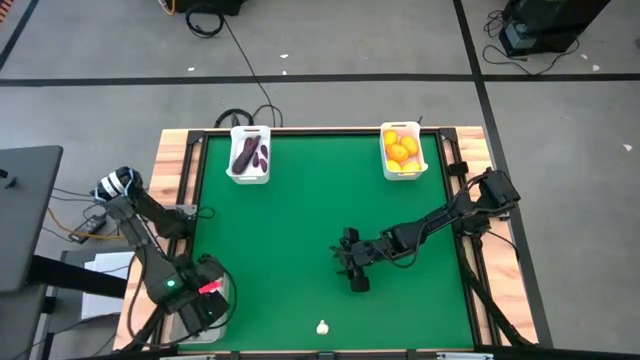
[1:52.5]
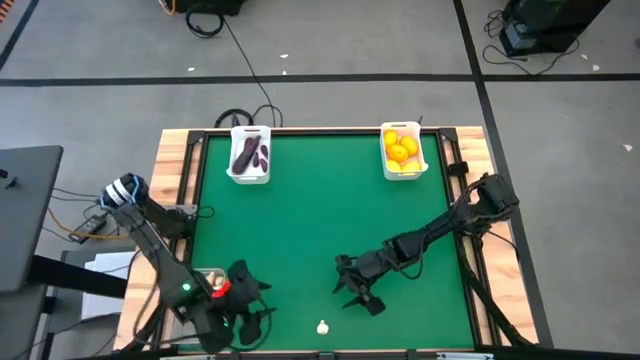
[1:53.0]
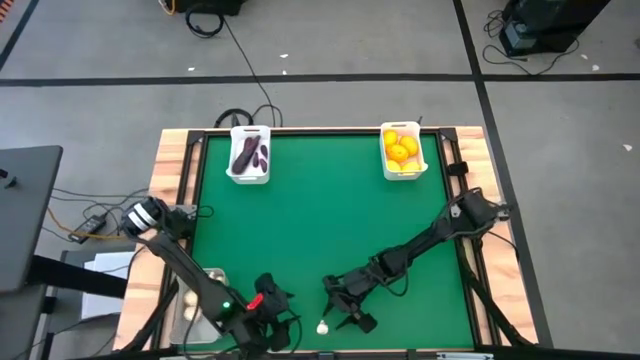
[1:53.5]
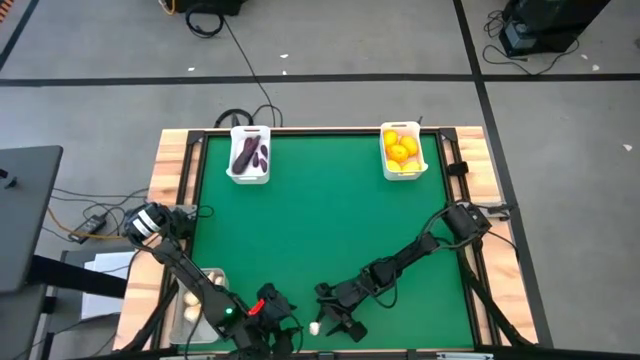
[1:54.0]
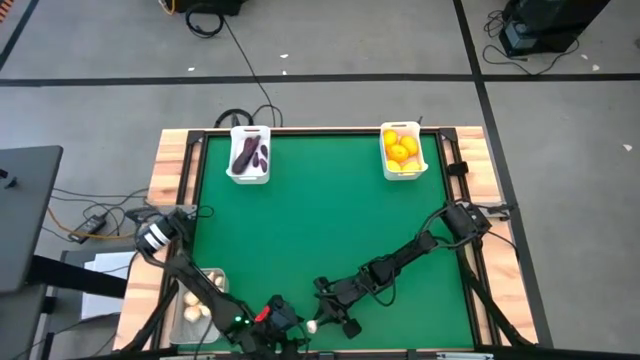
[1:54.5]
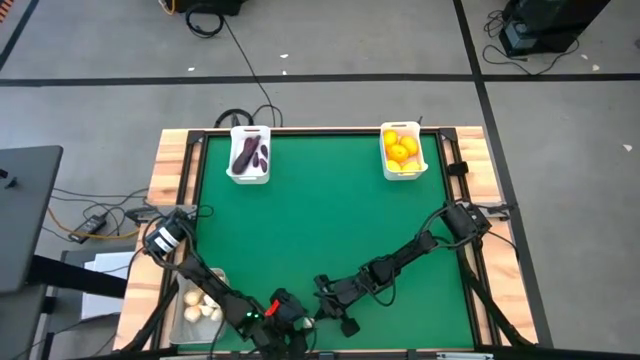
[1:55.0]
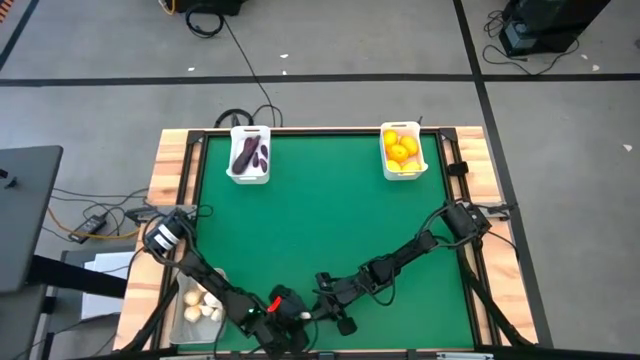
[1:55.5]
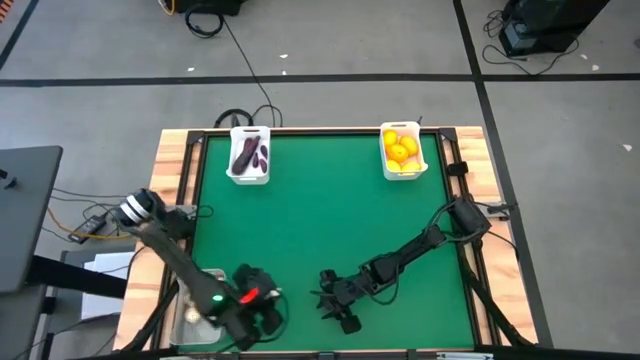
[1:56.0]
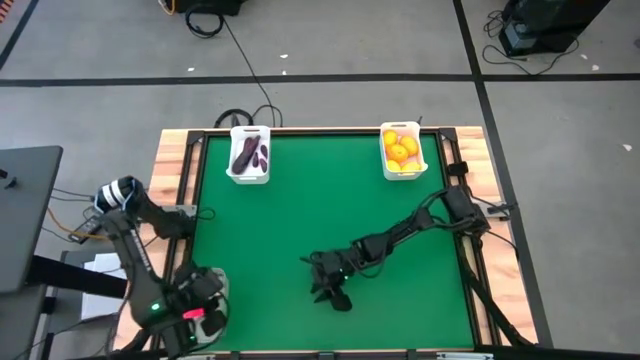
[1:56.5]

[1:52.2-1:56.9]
Task: Sort produce into baskets
Put the garlic on the gray bin

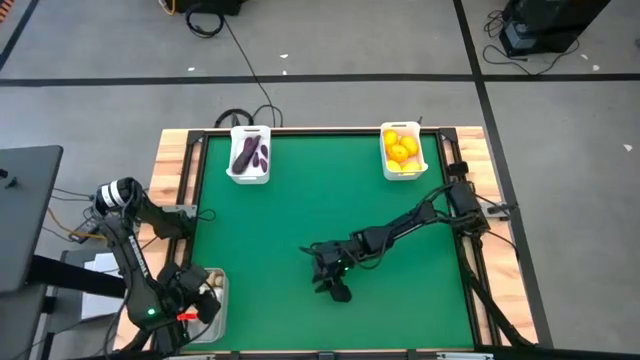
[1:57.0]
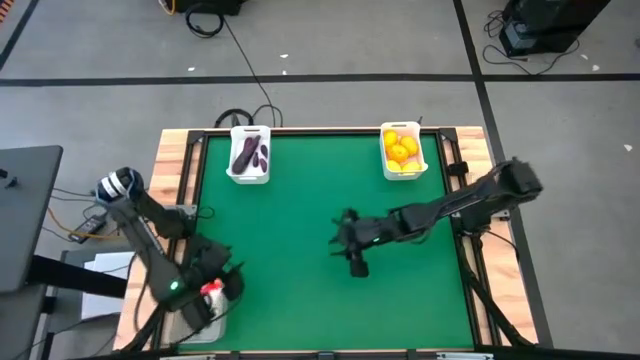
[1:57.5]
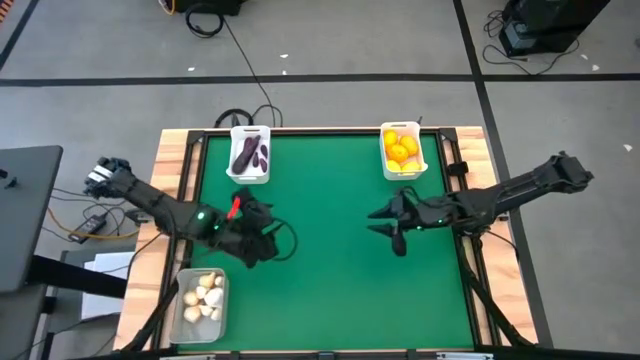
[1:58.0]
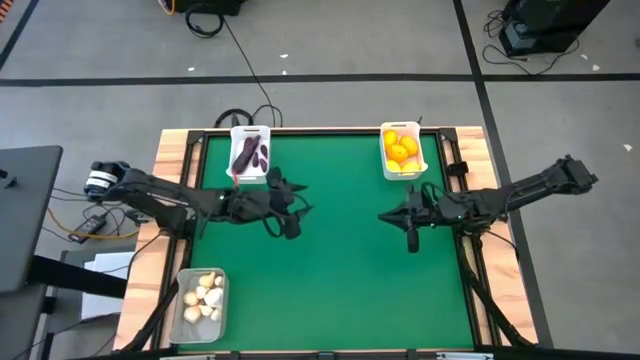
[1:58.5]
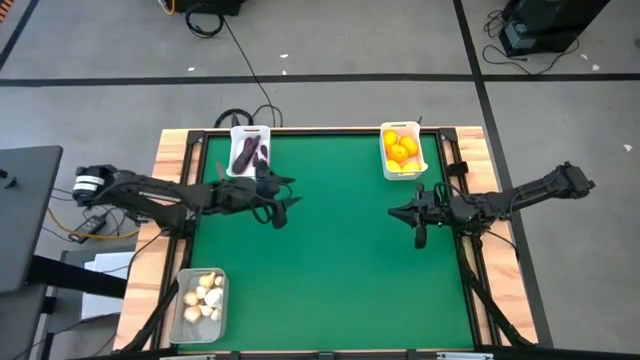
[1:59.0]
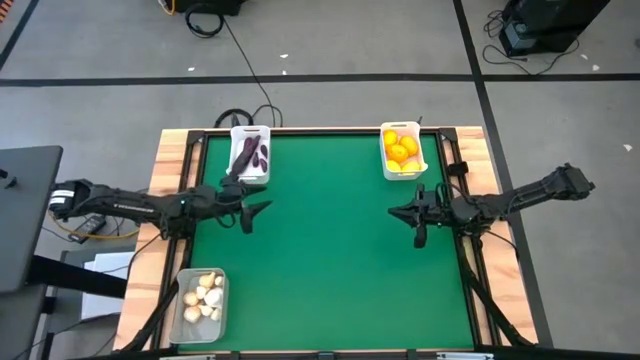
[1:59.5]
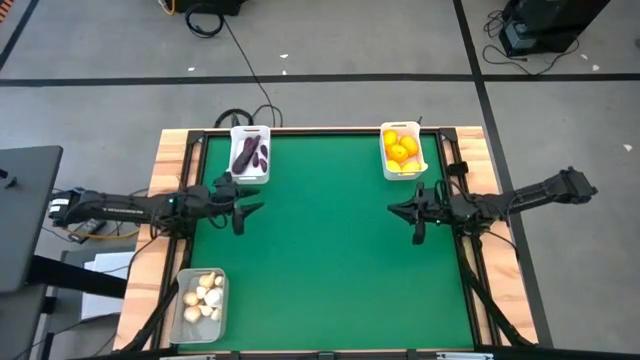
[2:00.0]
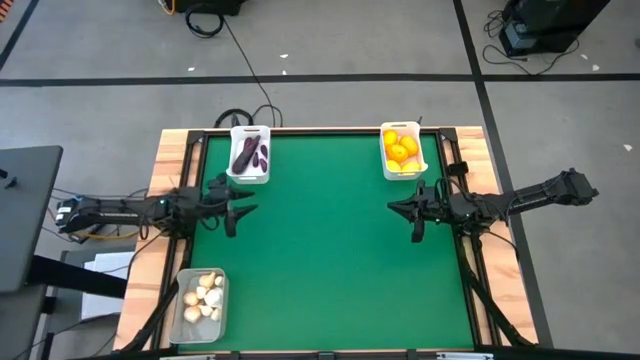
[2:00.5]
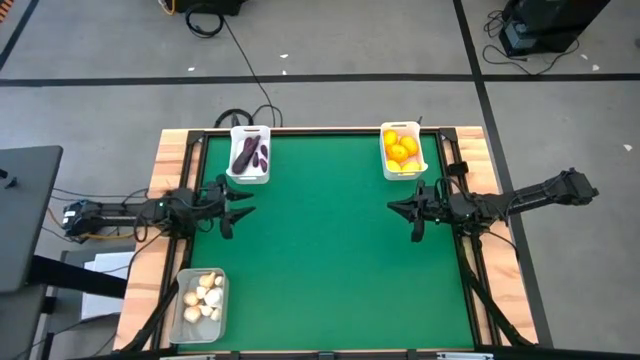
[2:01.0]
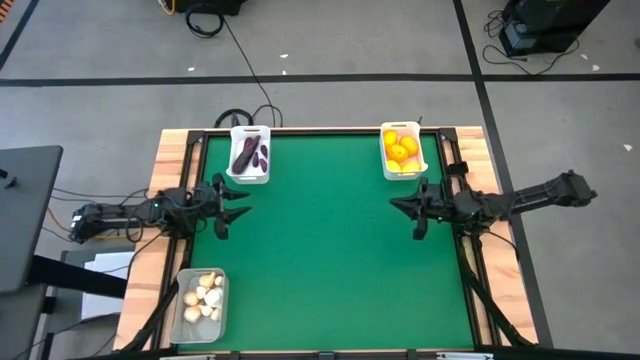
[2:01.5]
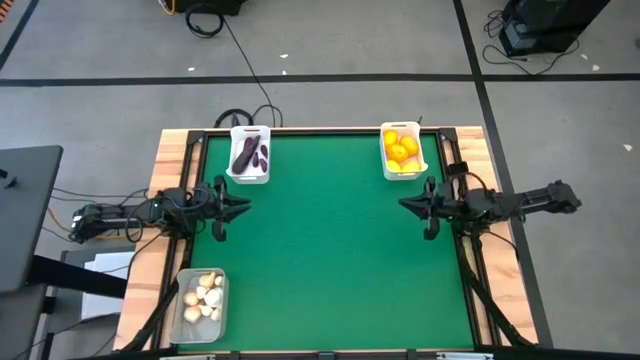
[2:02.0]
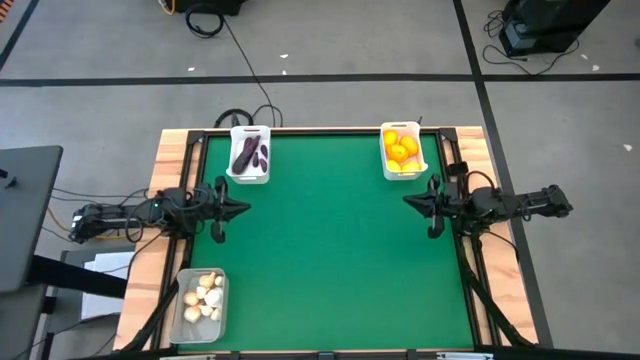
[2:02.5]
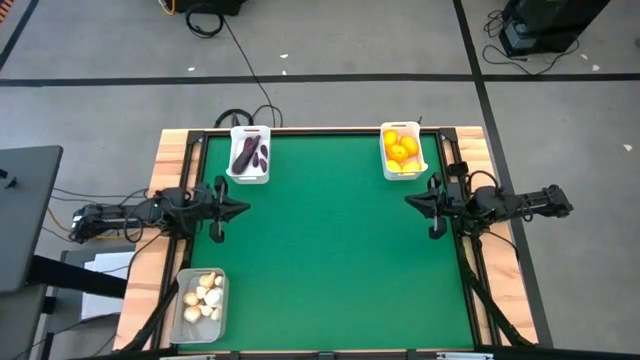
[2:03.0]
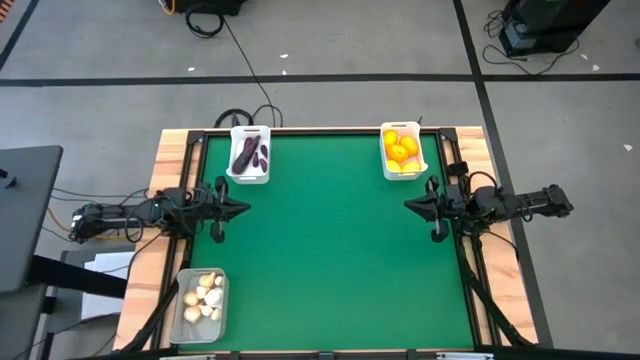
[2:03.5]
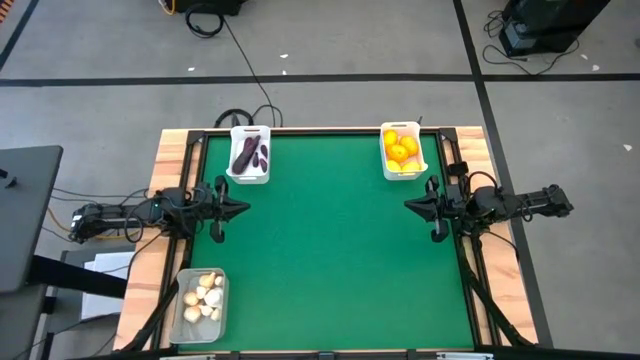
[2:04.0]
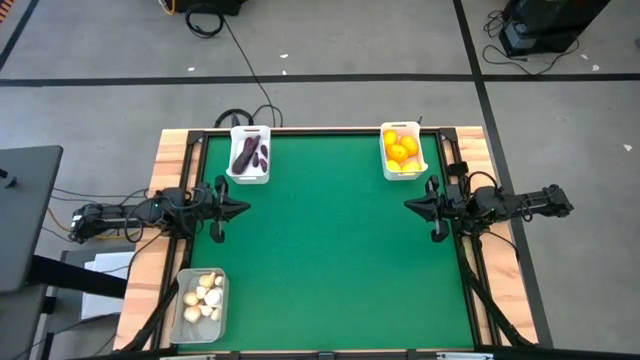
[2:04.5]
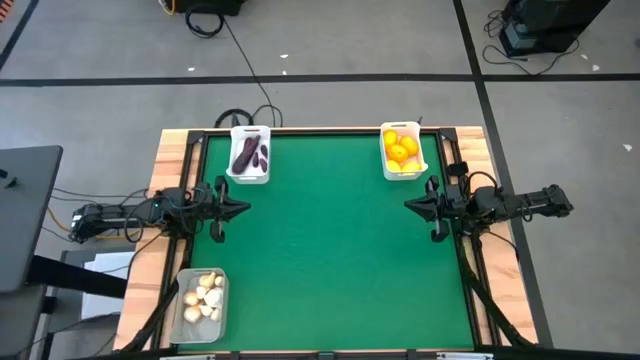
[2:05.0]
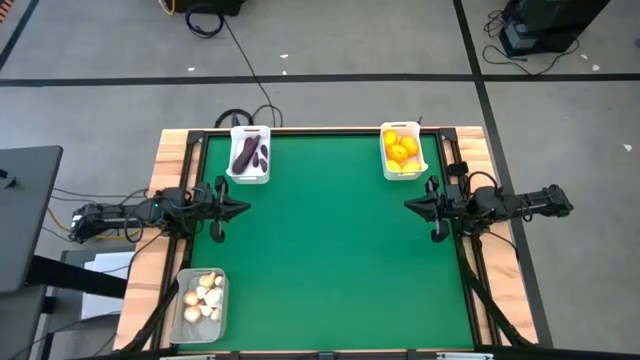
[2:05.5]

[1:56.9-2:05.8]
Return to Home Position

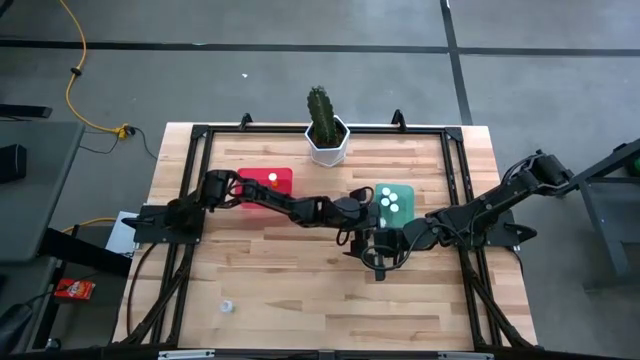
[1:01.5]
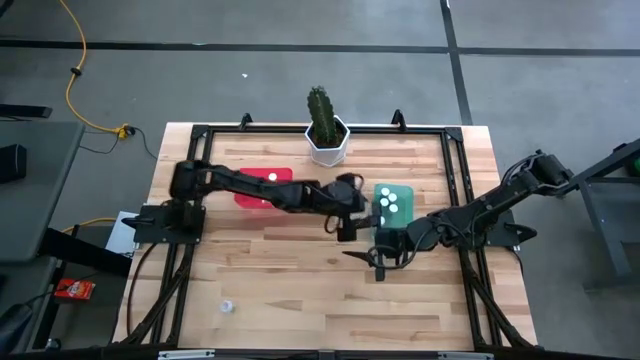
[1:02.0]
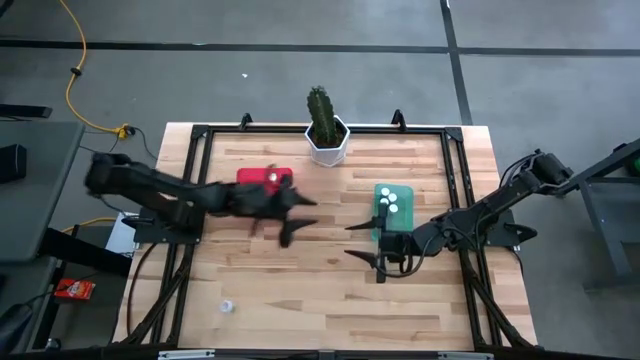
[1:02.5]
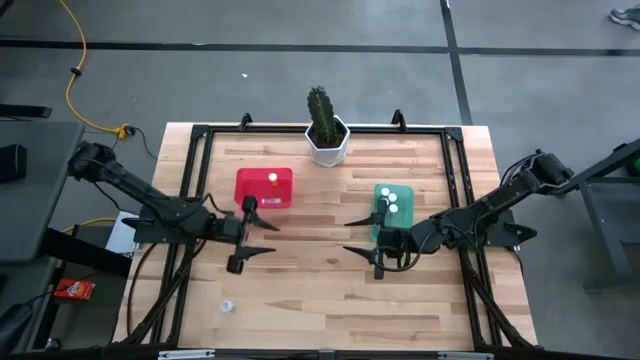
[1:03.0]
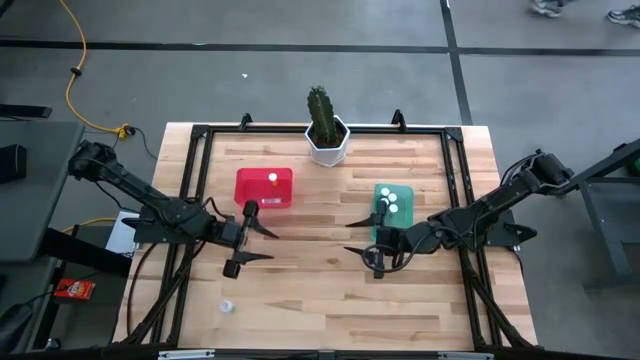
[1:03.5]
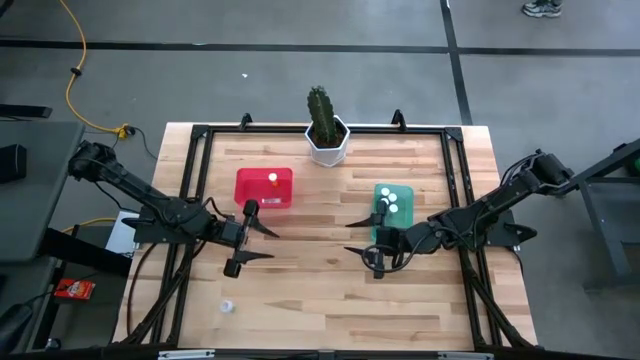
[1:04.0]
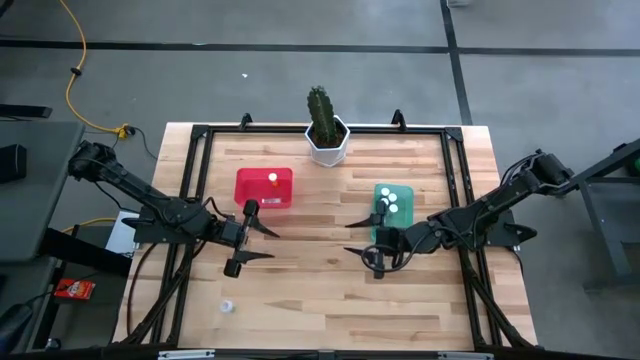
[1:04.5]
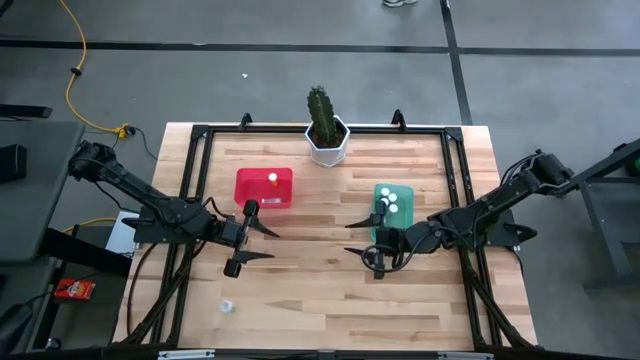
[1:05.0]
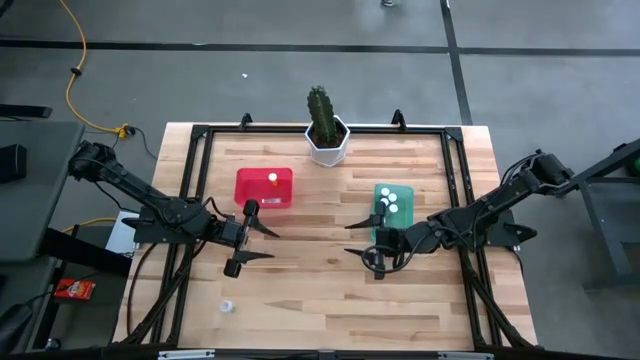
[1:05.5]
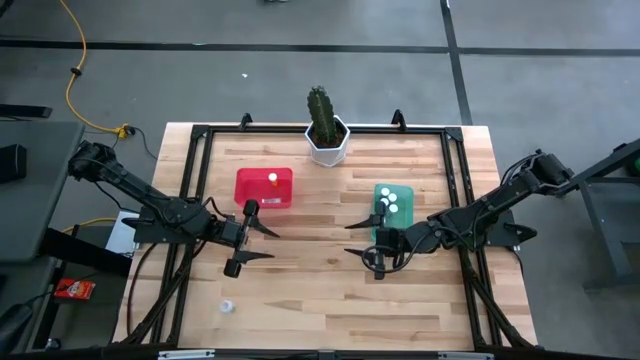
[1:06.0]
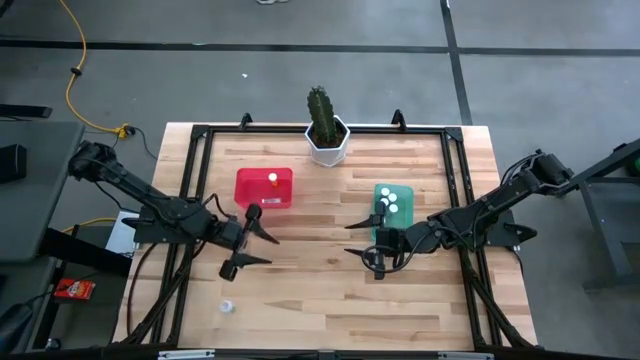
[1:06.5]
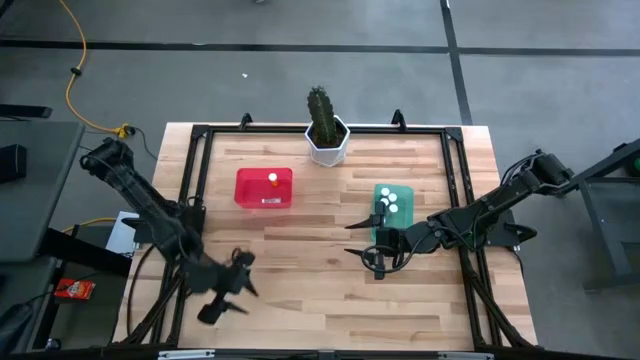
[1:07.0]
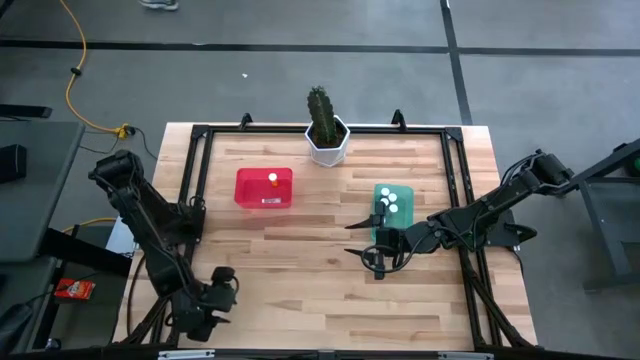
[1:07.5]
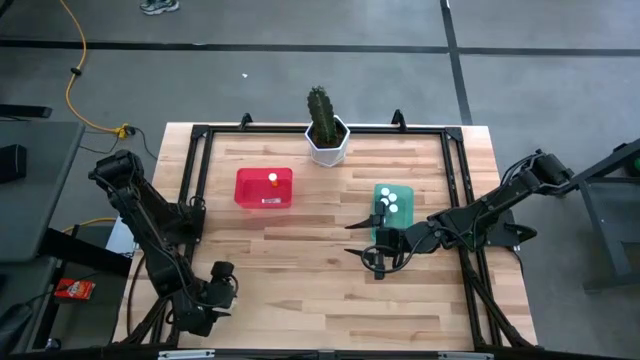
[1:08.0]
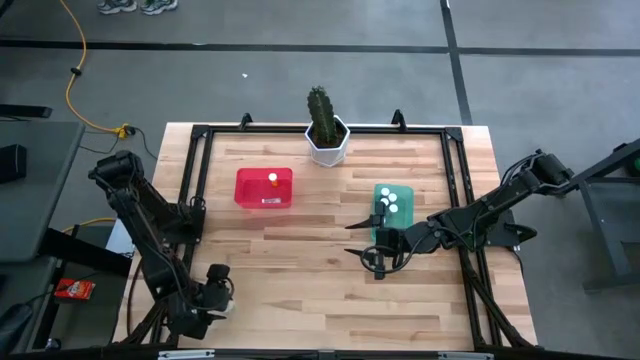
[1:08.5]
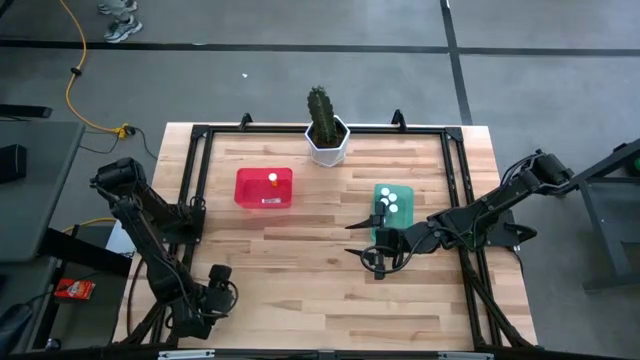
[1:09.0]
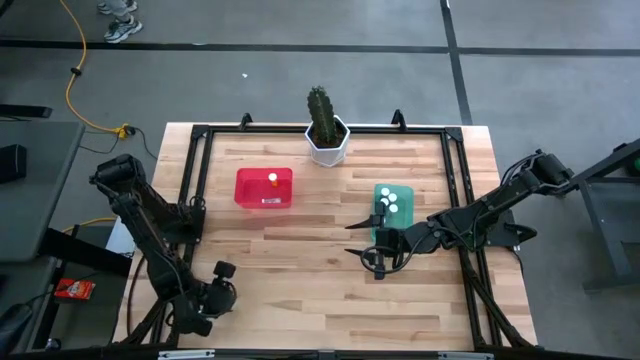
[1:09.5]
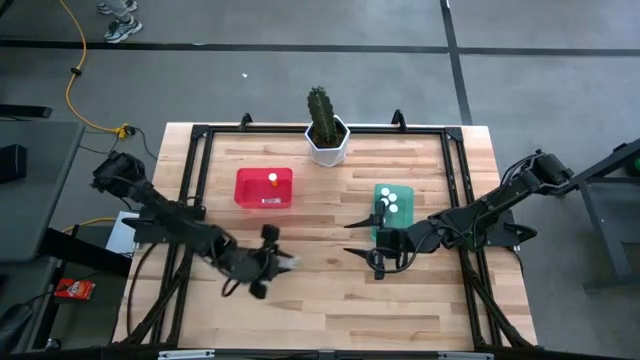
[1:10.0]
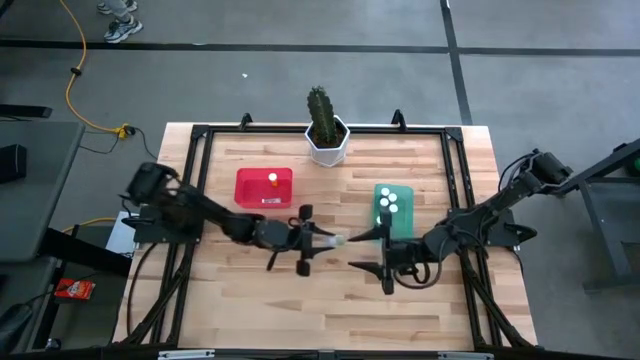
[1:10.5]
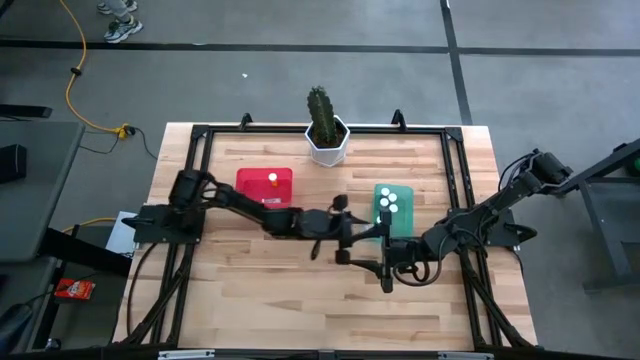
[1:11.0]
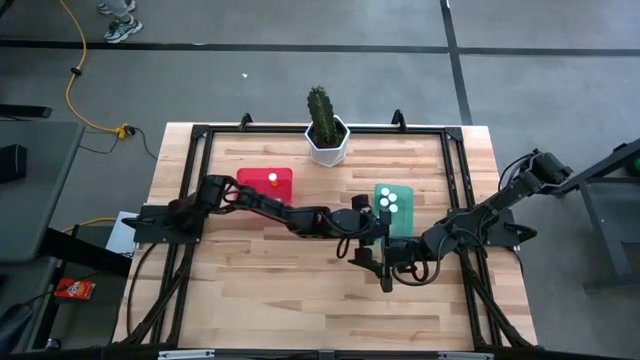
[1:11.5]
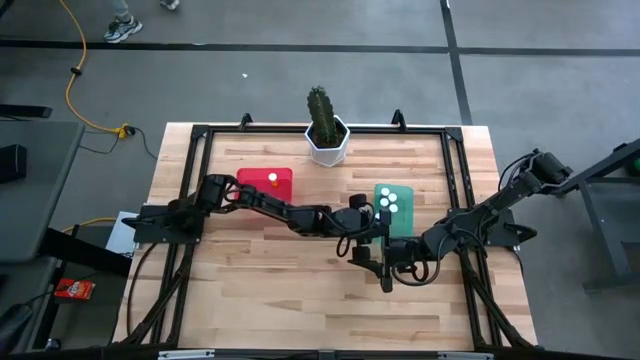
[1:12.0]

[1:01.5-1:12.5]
Task: Pick and place medicine bottles into bin by pill shape (circle, oval)
Put the transparent capsule bottle into the green bin
